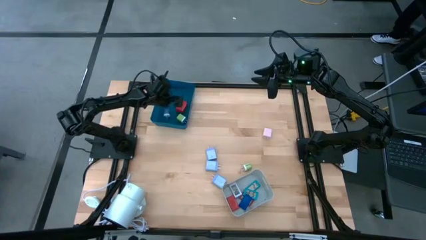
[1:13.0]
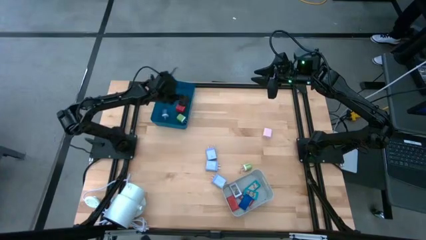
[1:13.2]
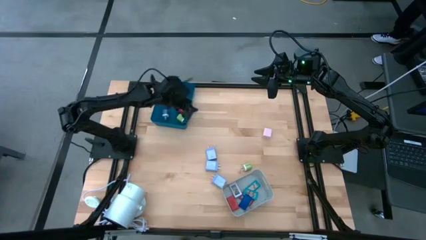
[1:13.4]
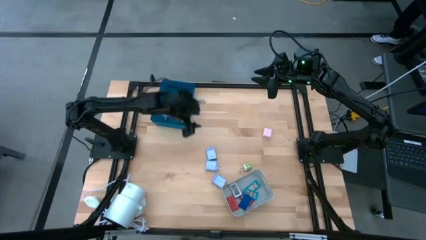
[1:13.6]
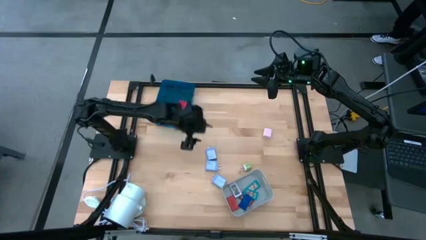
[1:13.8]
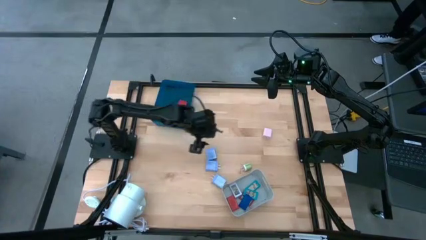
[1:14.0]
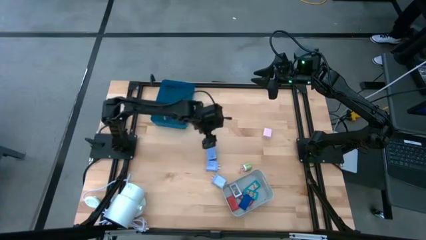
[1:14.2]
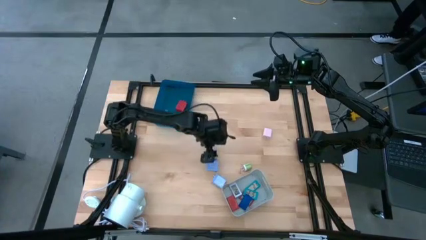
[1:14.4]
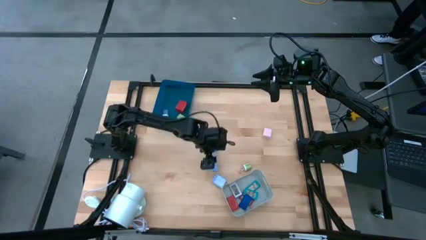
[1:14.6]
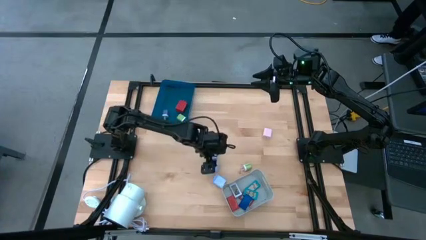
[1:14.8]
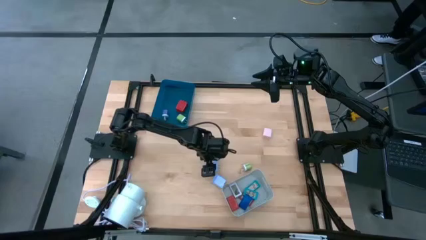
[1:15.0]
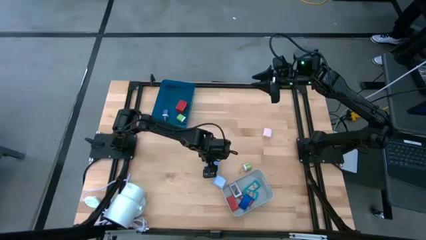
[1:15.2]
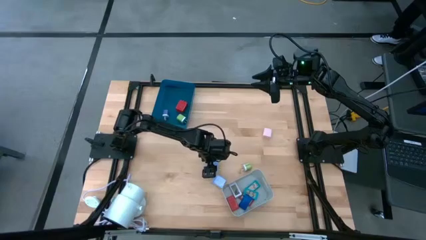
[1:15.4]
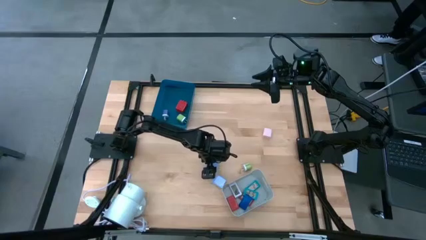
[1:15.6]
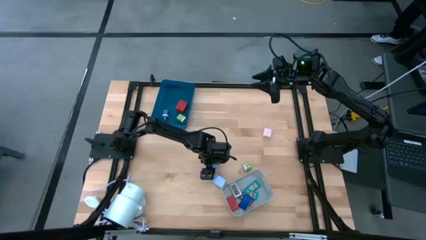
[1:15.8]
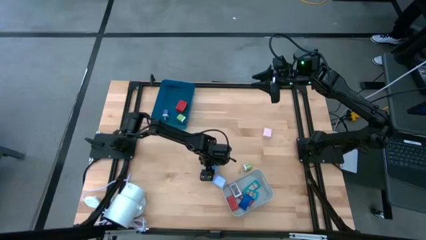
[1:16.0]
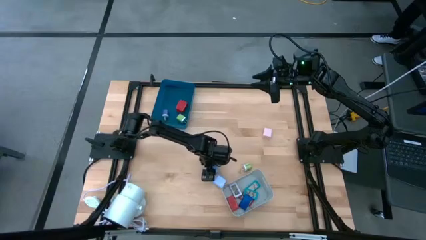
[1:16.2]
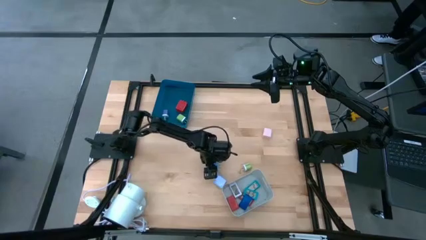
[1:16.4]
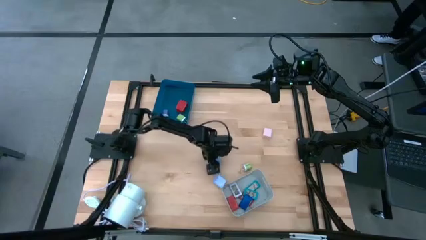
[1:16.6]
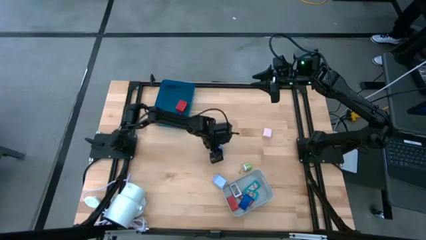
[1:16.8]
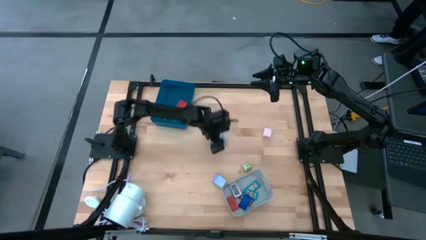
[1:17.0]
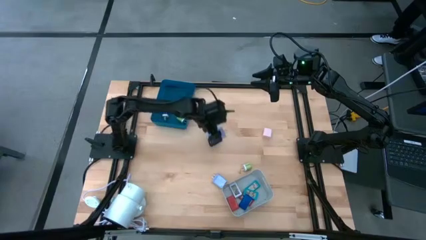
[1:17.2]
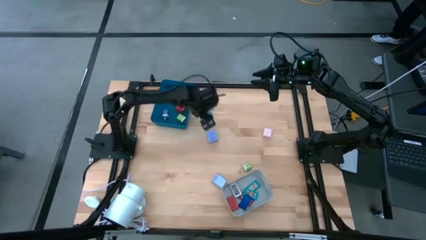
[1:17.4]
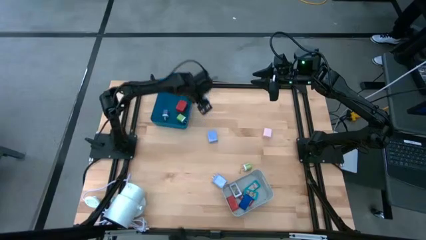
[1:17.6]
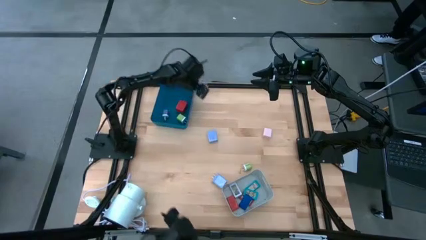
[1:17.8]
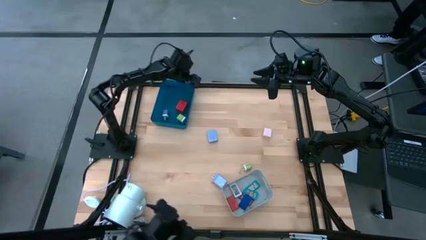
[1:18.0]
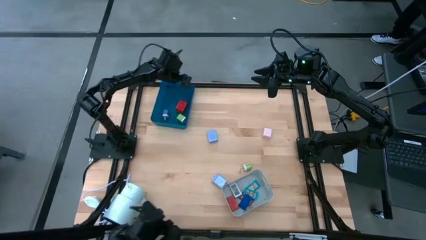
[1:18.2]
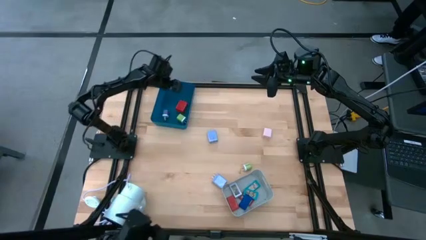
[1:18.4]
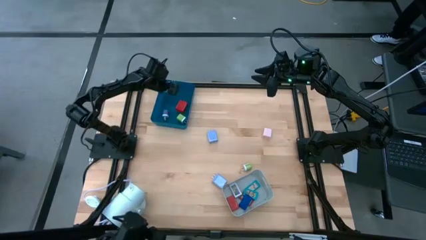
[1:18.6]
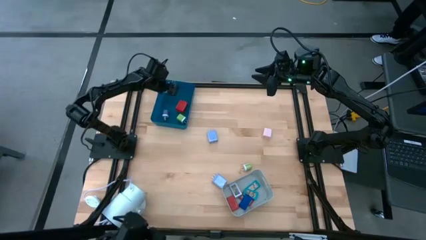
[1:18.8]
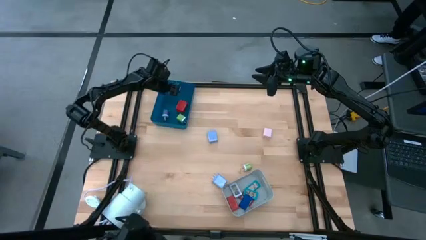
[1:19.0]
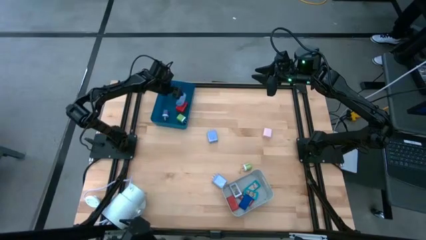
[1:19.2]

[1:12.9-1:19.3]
Task: Pick & Place Office items
Put the middle blue charger adapter into the blue bin

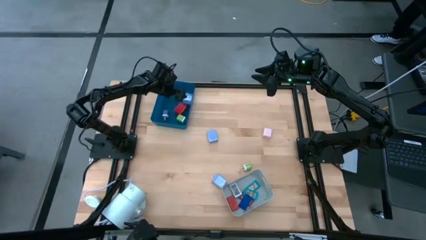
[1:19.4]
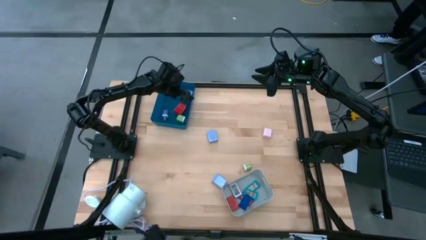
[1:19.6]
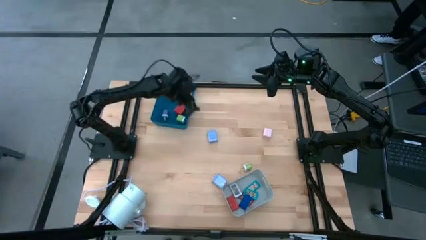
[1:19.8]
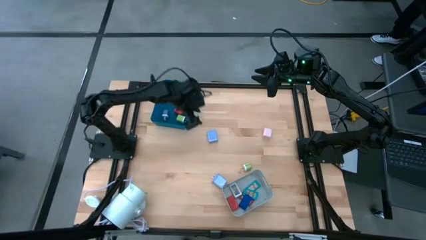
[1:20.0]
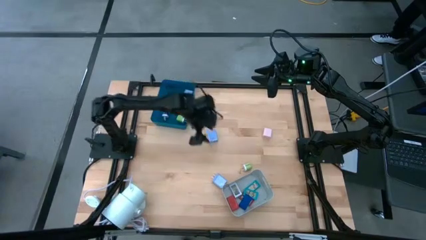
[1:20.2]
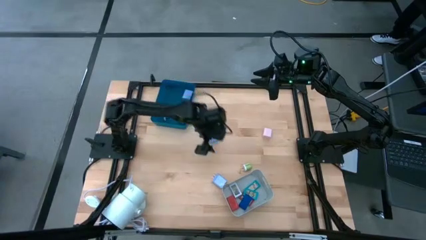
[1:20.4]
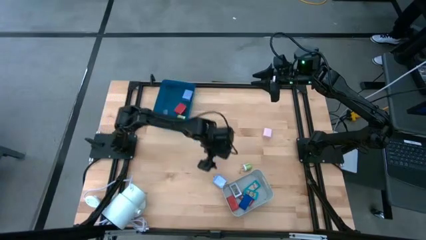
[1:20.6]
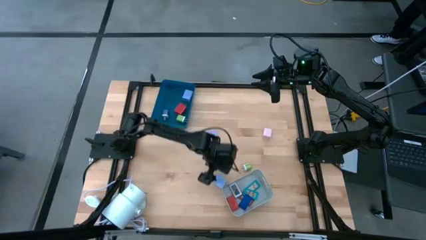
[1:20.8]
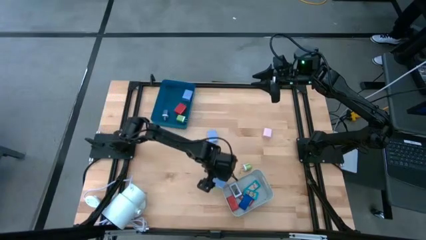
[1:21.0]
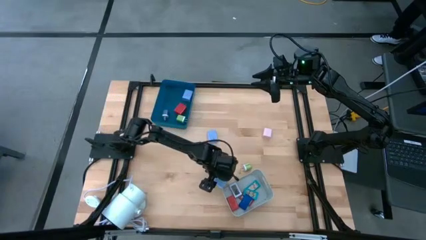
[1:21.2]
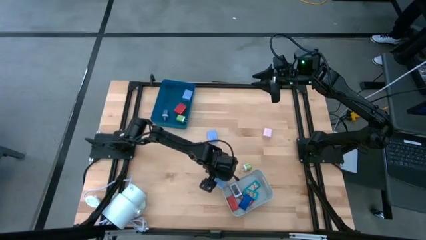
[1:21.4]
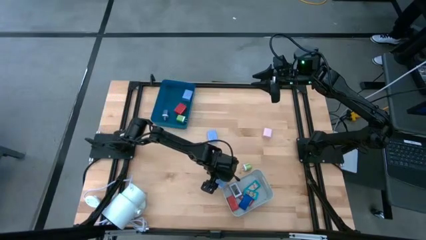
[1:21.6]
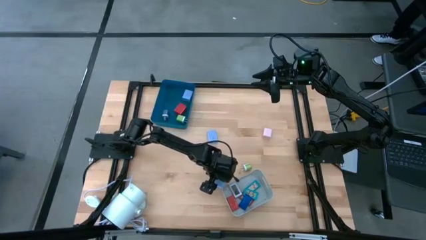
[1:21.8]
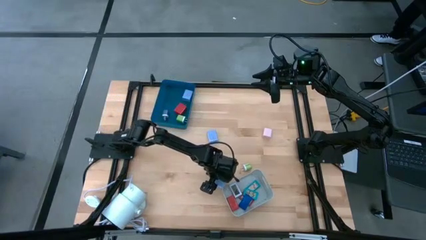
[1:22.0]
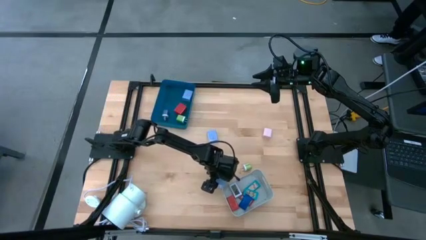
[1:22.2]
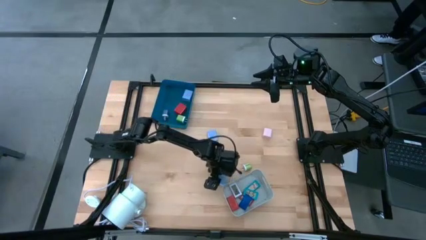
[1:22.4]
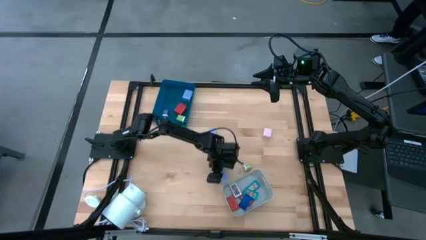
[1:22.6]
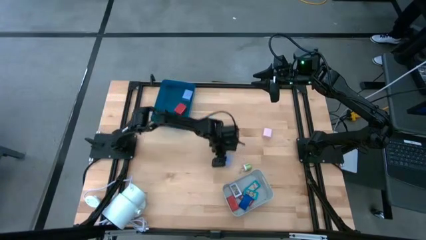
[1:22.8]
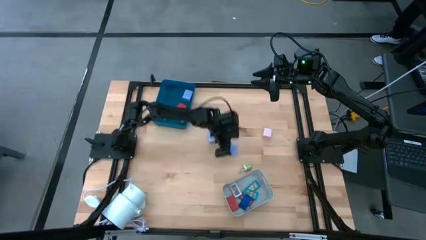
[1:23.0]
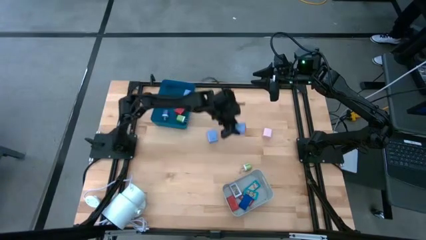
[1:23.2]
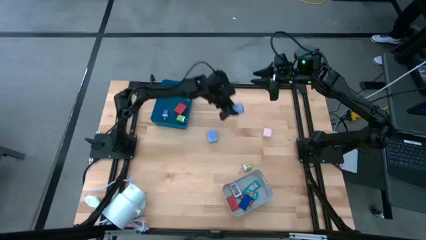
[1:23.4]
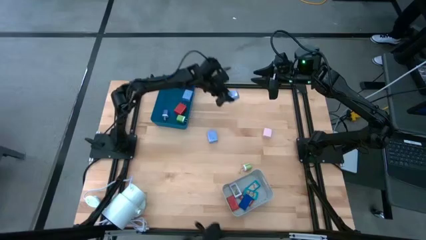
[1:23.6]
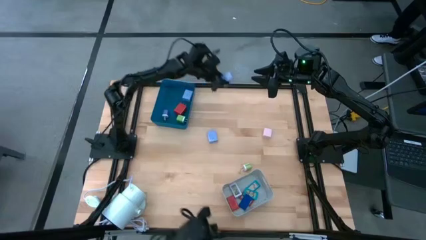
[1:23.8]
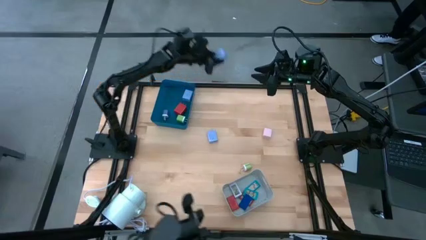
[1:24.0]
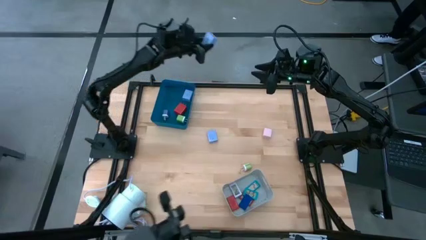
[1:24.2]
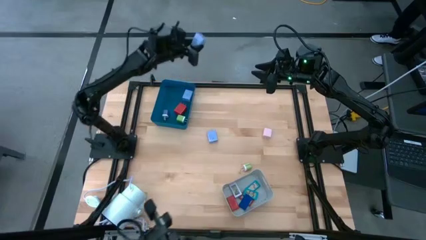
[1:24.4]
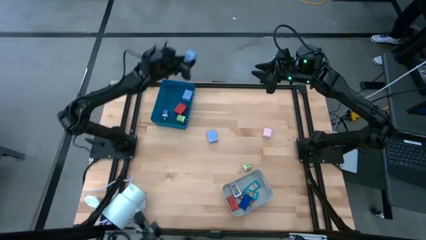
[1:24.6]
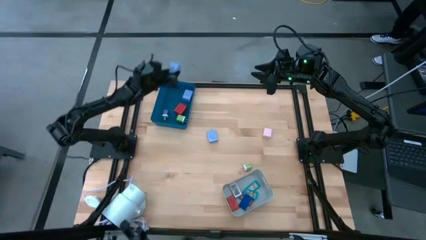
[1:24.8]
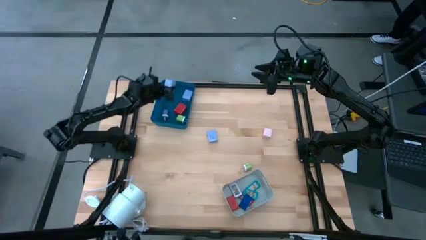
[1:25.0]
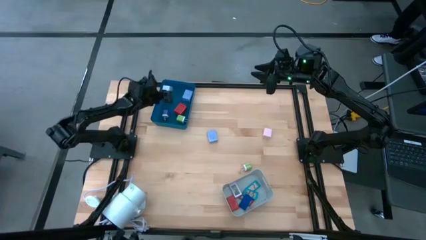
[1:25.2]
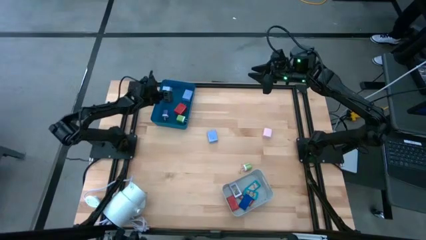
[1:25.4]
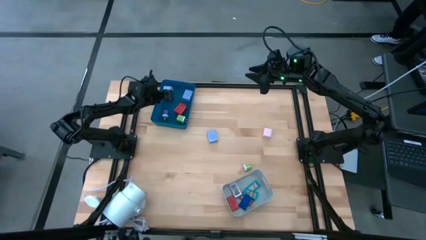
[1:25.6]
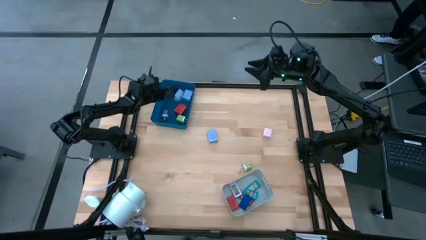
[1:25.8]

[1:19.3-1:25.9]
Put the bottom blue charger adapter into the blue bin

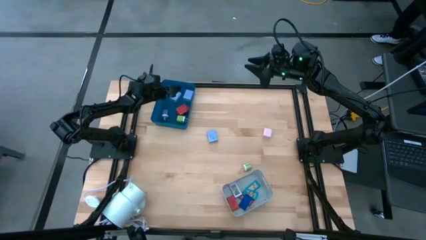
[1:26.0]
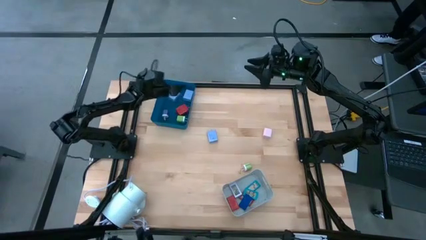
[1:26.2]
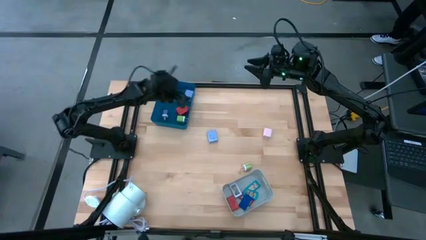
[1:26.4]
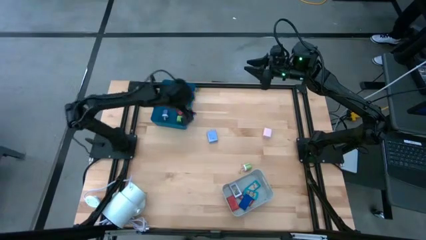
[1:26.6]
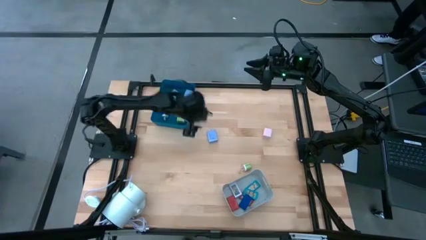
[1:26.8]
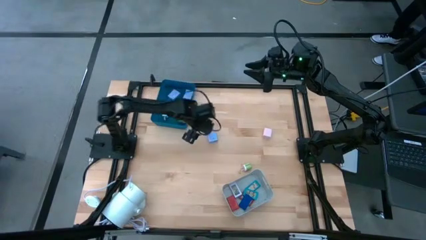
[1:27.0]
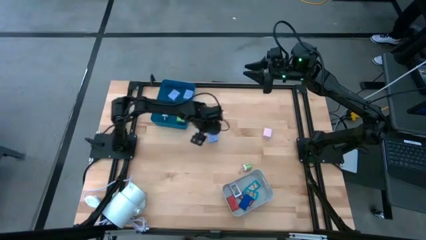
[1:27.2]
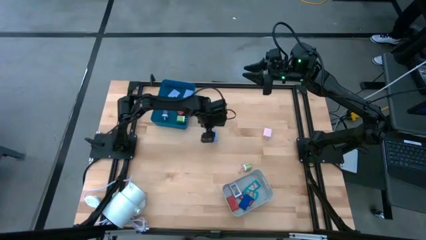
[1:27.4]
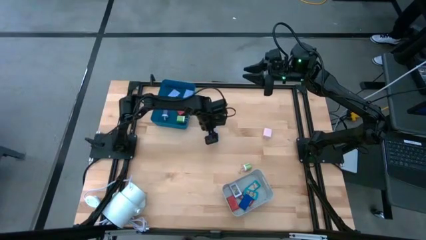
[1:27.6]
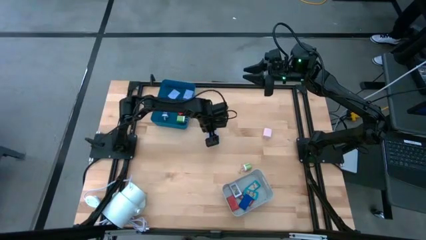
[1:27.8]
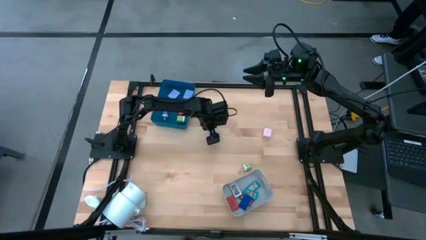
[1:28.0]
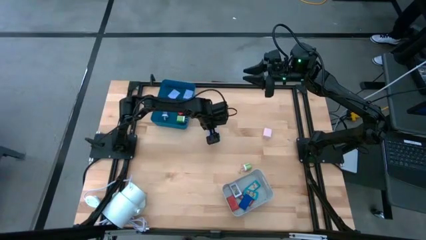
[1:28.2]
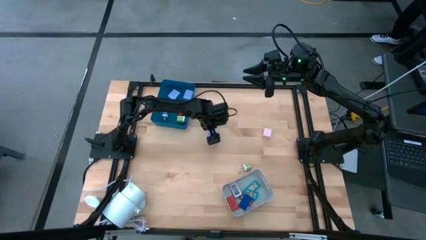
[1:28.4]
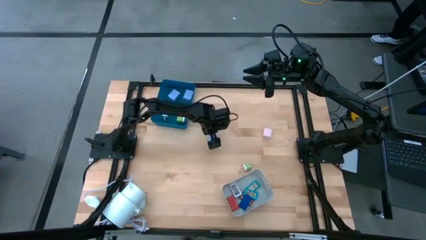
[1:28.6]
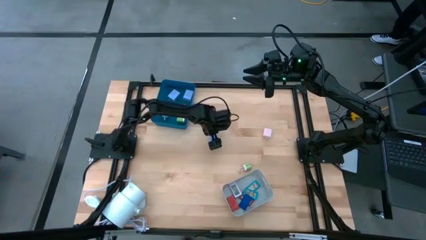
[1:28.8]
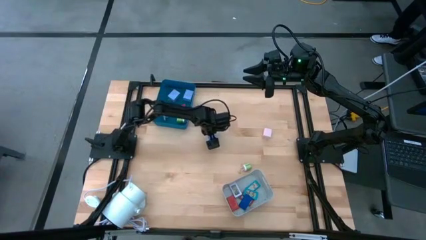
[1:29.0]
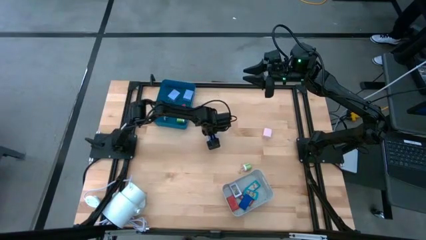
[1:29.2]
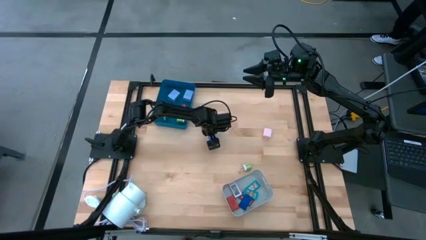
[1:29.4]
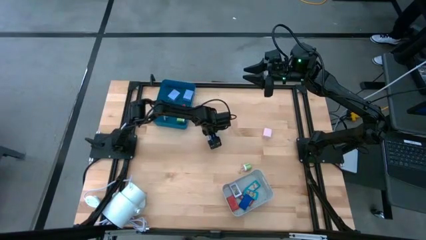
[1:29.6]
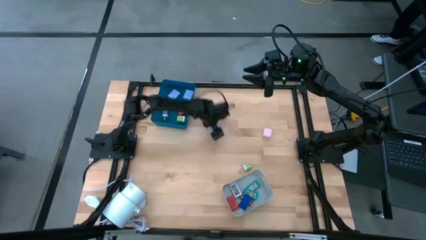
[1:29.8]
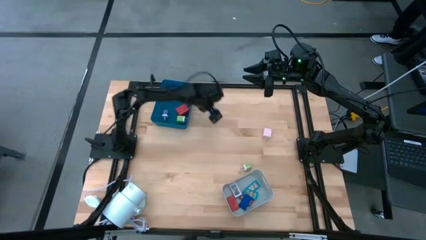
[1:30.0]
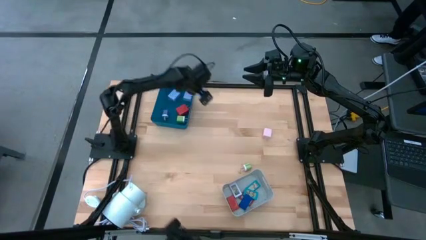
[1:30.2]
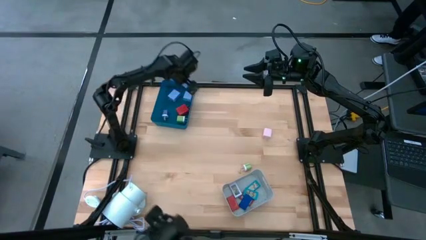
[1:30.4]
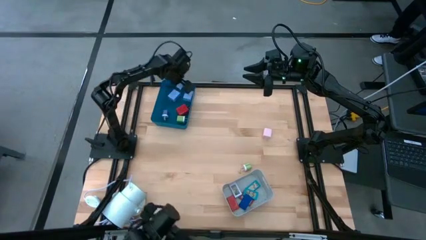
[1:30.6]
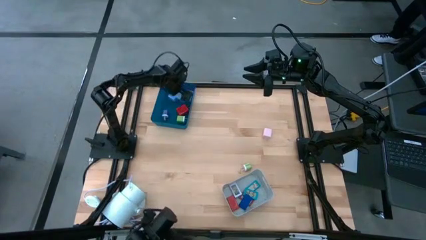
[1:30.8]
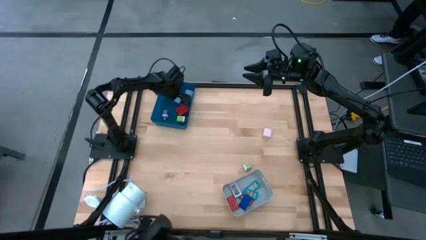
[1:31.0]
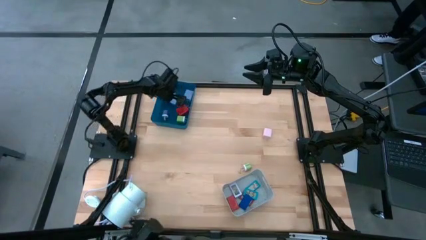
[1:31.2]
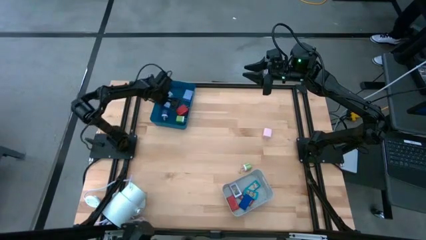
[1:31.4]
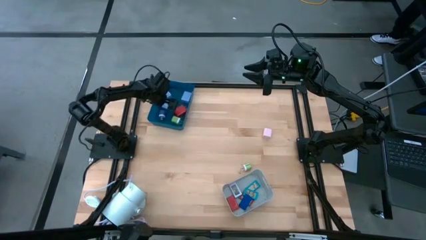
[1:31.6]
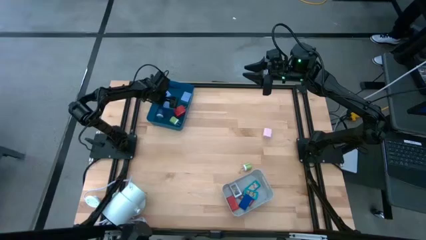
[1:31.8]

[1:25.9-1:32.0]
Put the blue charger adapter into the blue bin
